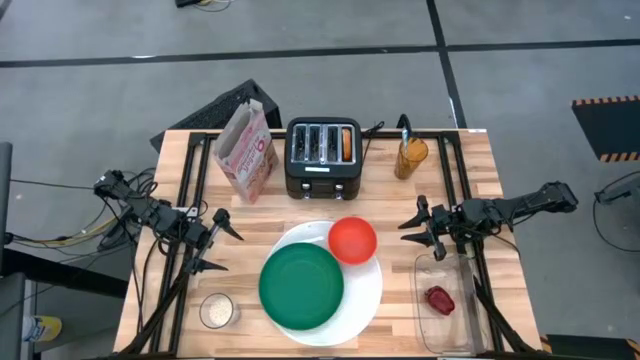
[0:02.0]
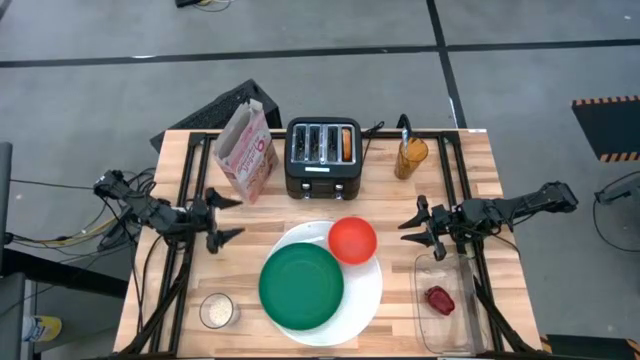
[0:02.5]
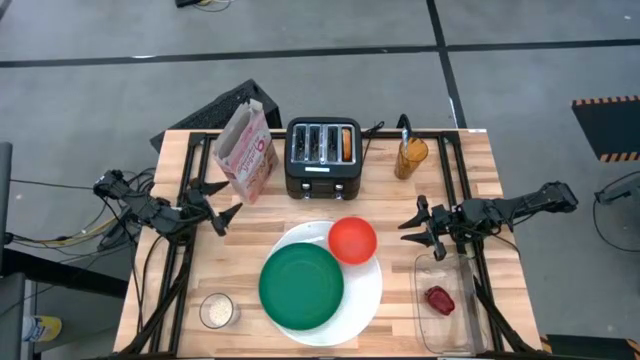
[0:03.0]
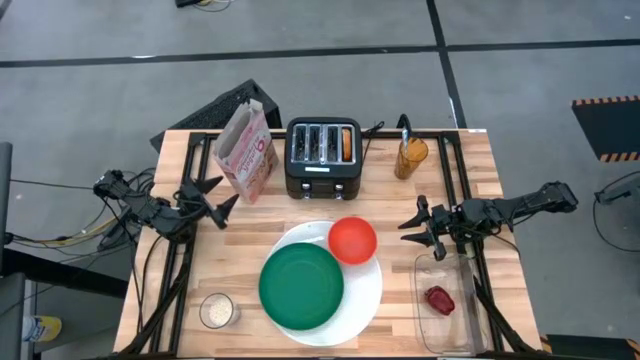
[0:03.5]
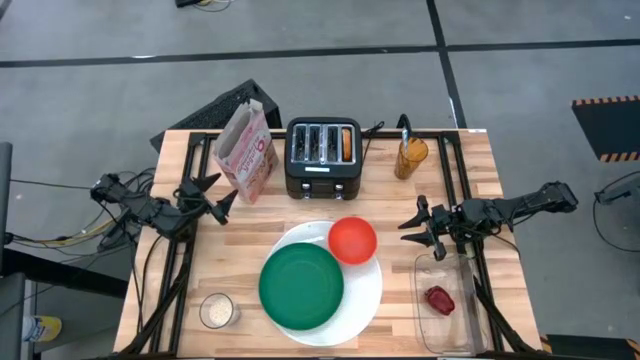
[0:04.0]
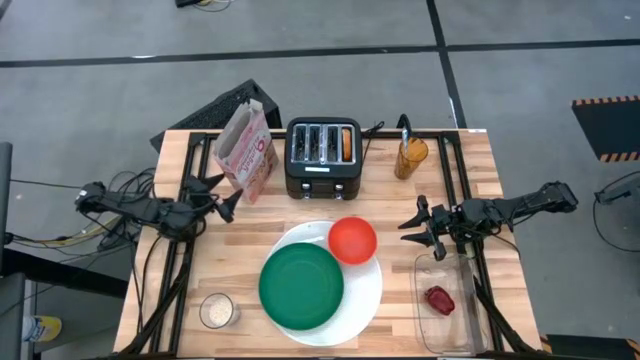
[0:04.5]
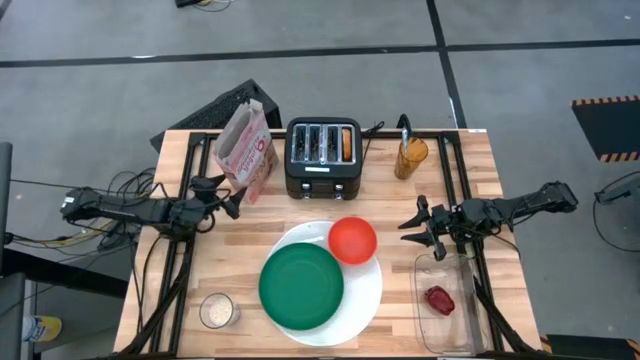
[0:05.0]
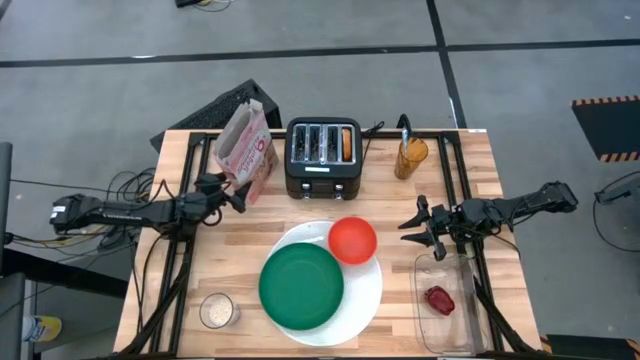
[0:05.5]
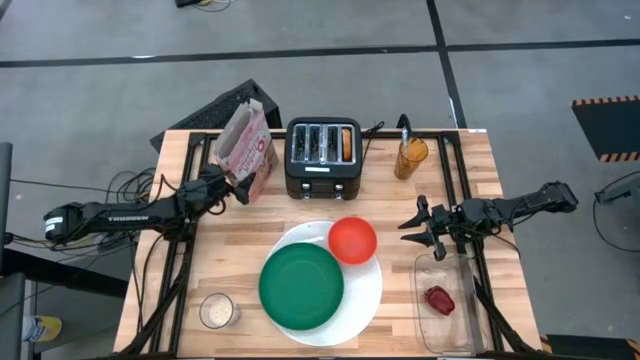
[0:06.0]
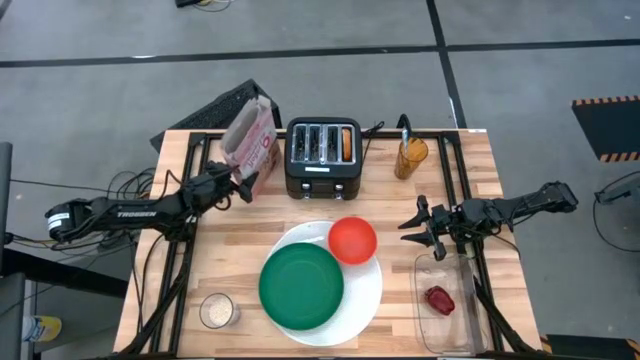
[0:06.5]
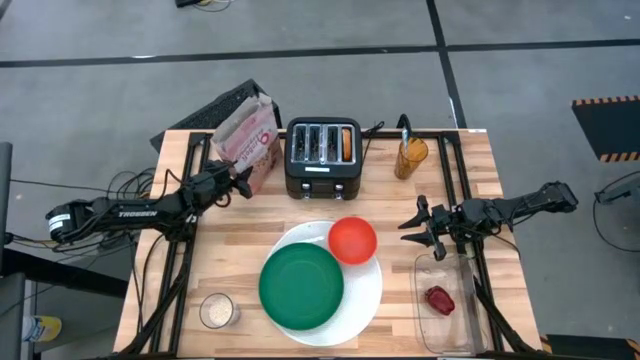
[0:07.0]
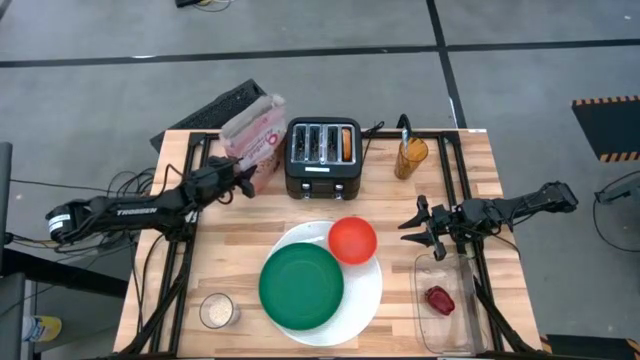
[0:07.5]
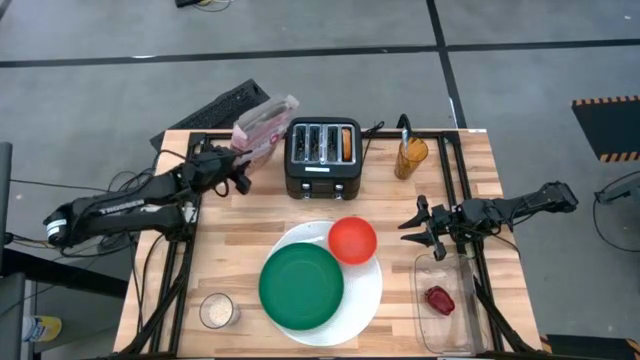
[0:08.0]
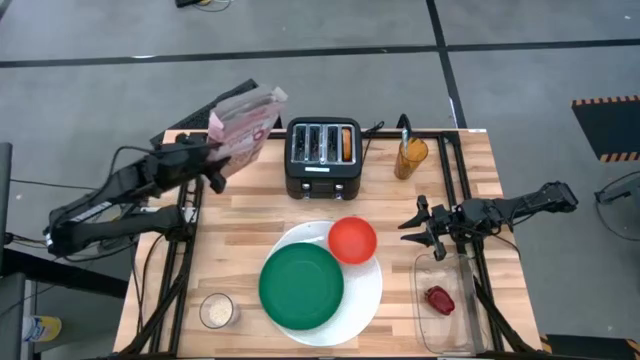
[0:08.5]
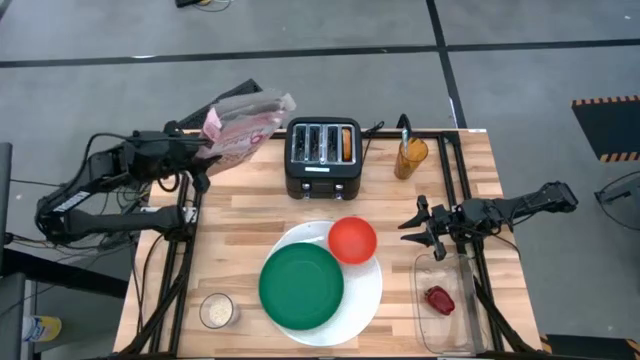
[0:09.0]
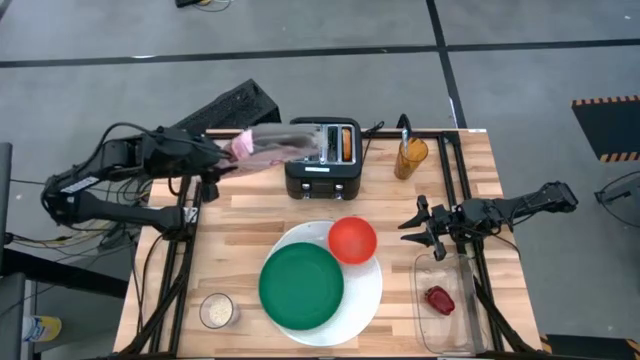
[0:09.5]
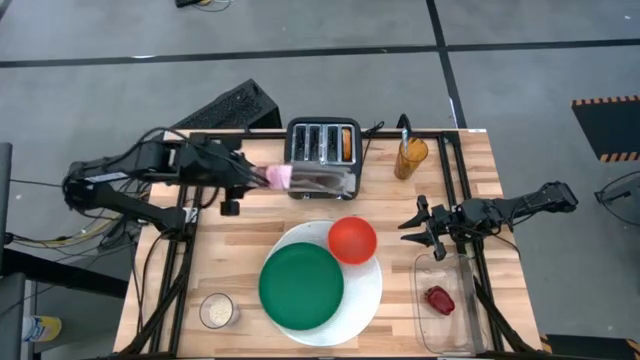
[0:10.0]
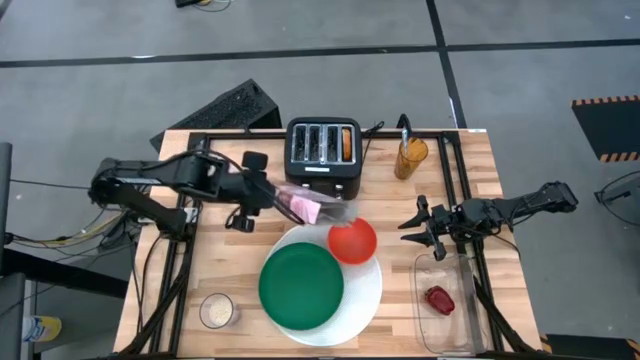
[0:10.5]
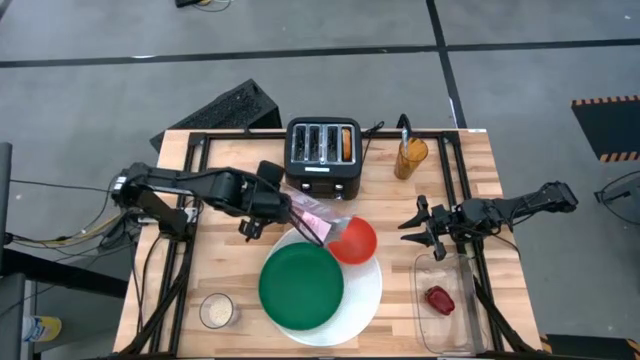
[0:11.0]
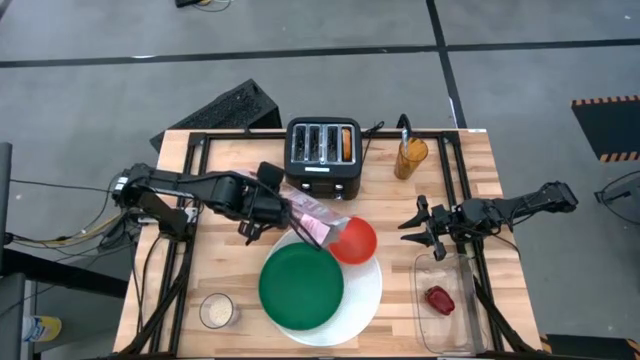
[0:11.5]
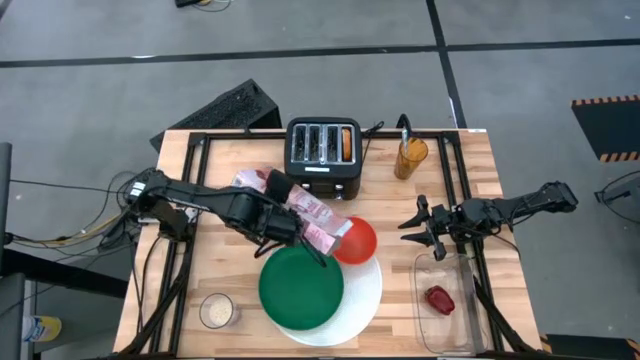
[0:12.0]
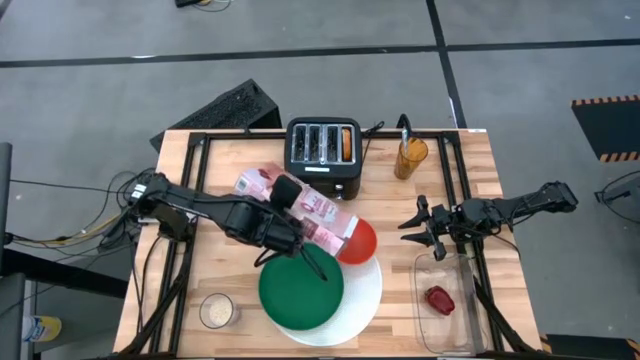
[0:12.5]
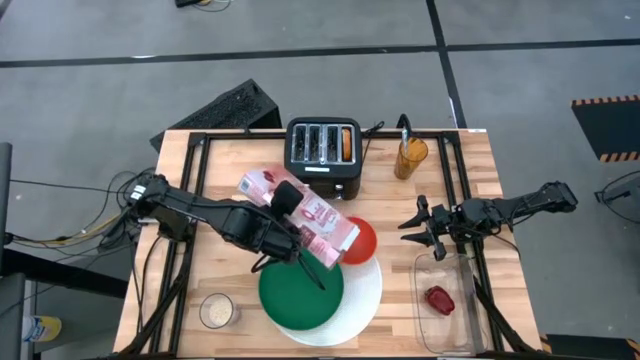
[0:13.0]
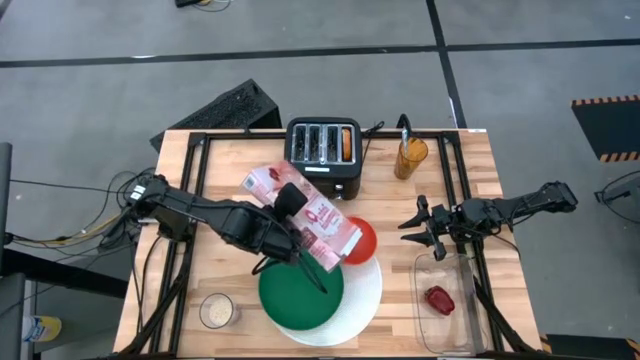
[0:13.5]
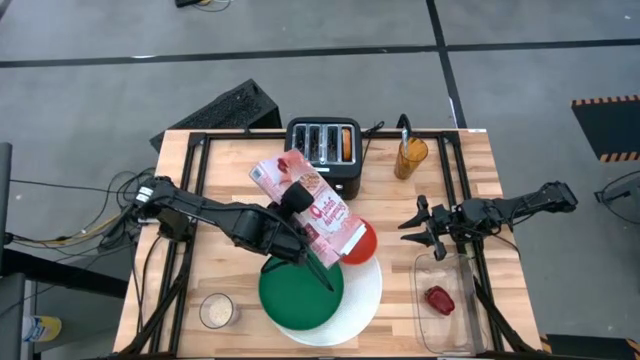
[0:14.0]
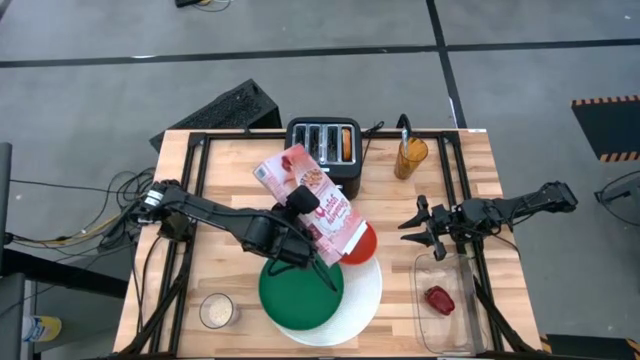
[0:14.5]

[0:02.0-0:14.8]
Task: Arrange a breakfast setting
Pour the cereal from the cereal box into the orange bowl

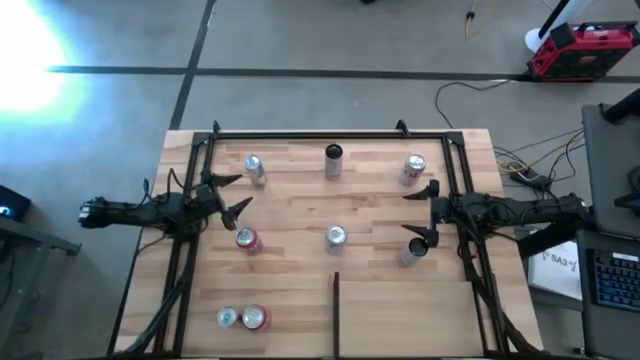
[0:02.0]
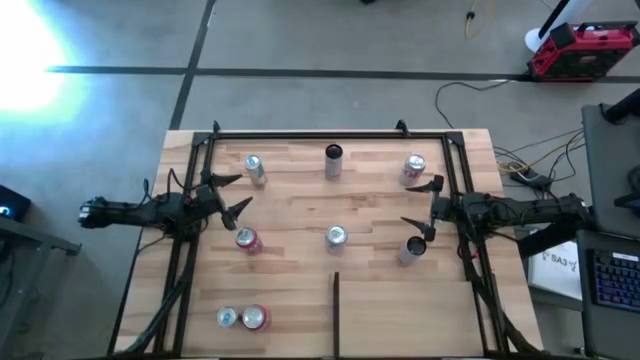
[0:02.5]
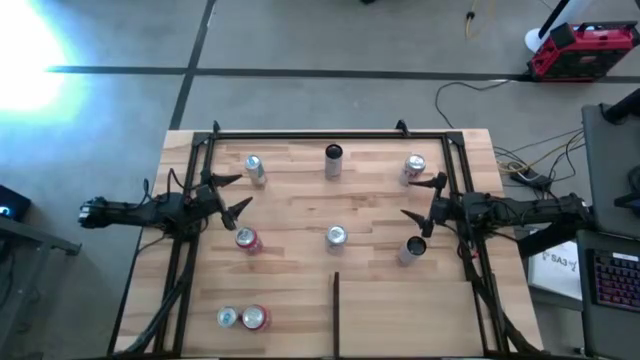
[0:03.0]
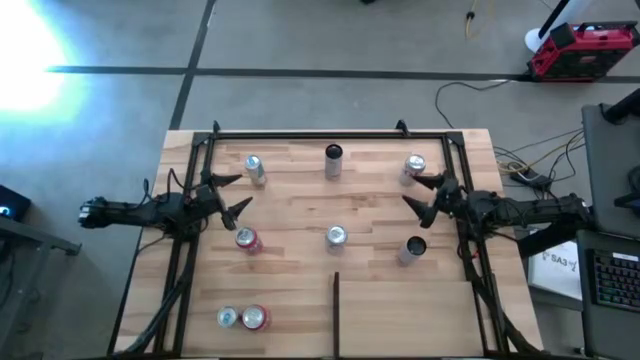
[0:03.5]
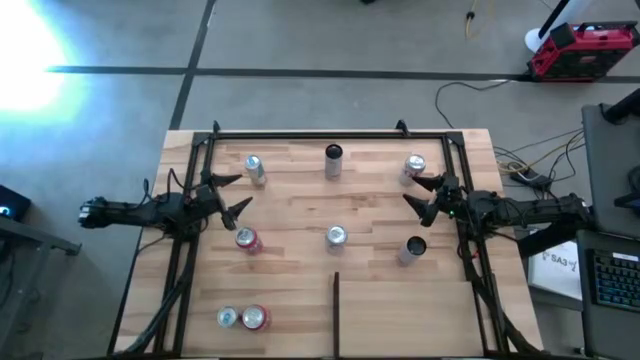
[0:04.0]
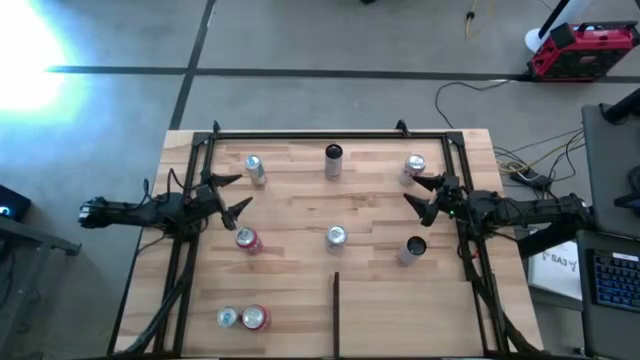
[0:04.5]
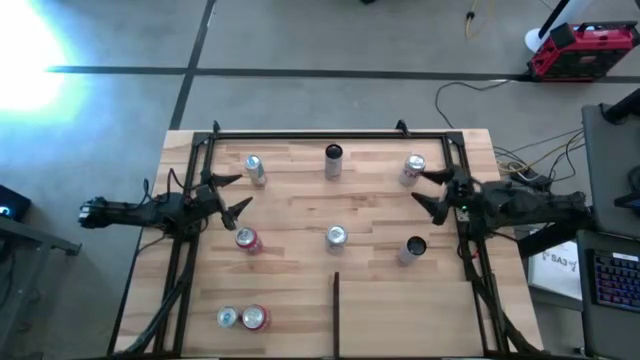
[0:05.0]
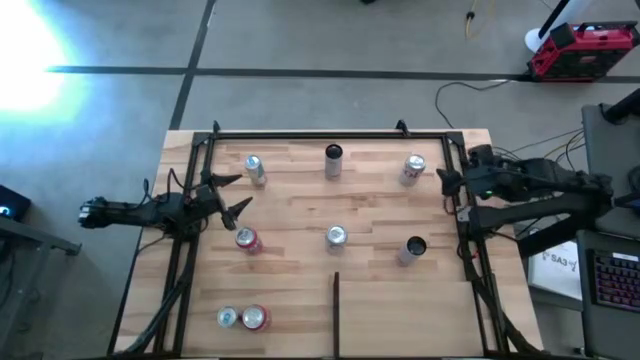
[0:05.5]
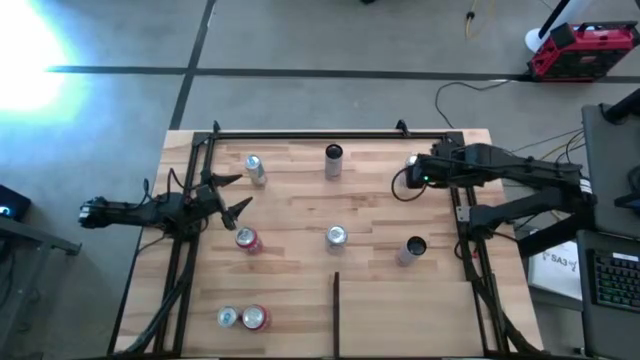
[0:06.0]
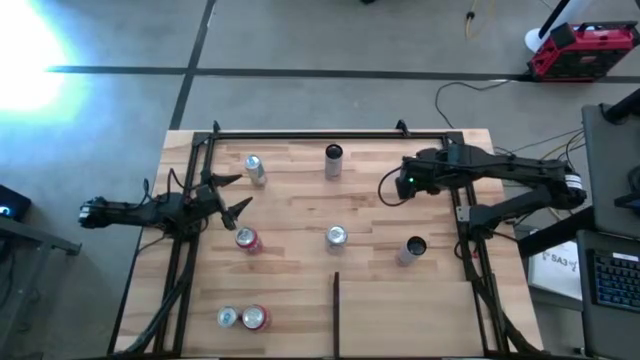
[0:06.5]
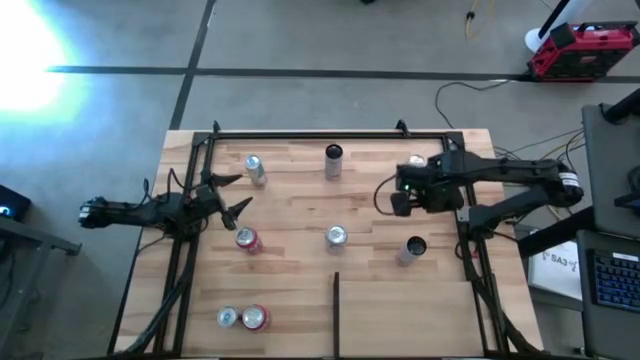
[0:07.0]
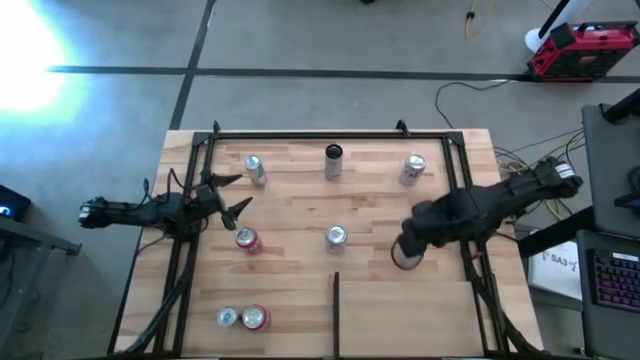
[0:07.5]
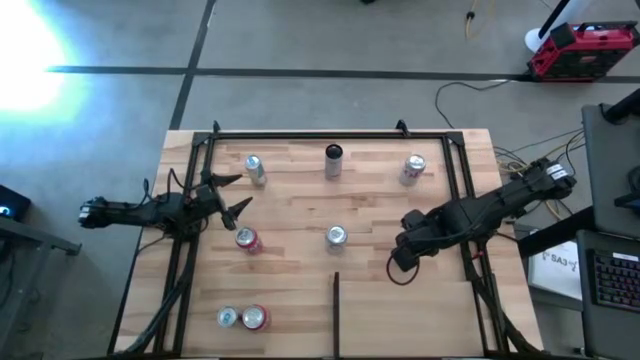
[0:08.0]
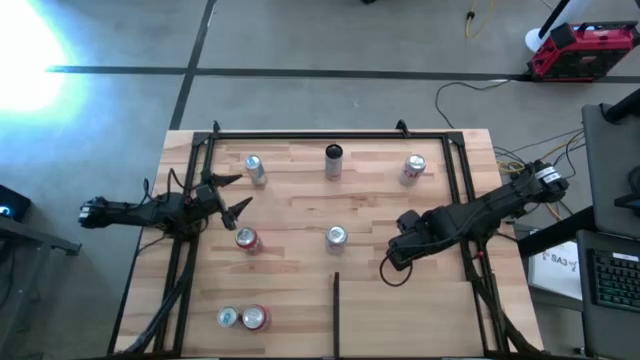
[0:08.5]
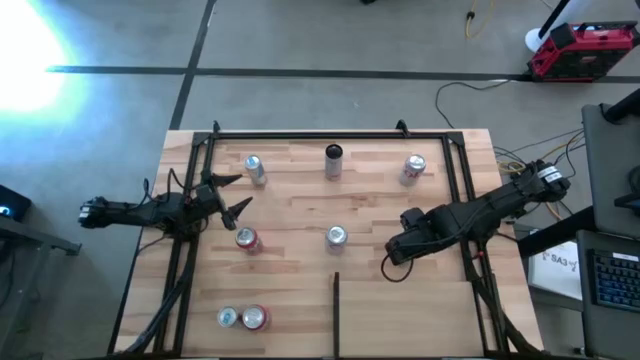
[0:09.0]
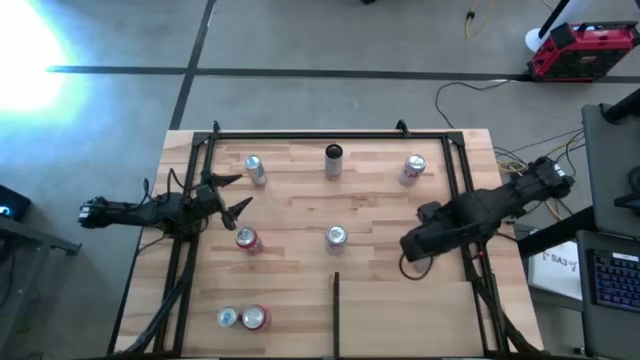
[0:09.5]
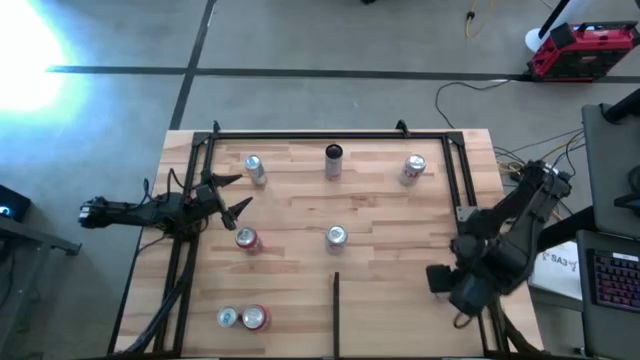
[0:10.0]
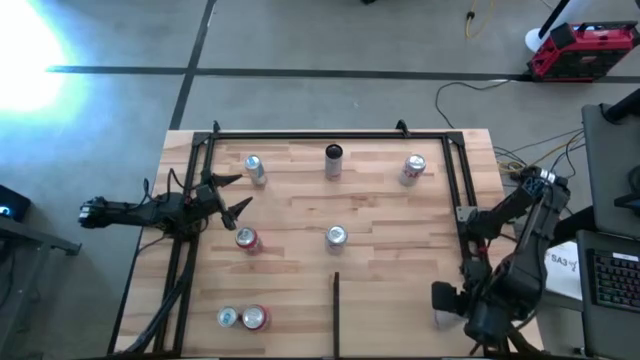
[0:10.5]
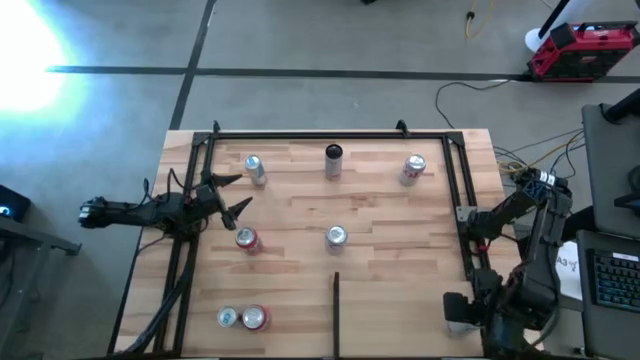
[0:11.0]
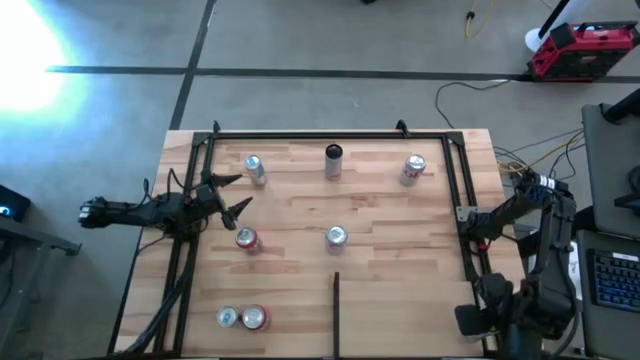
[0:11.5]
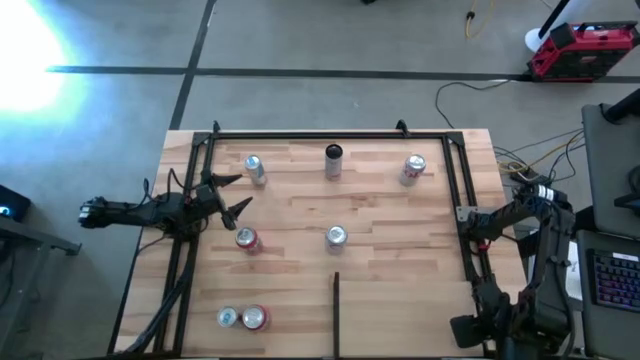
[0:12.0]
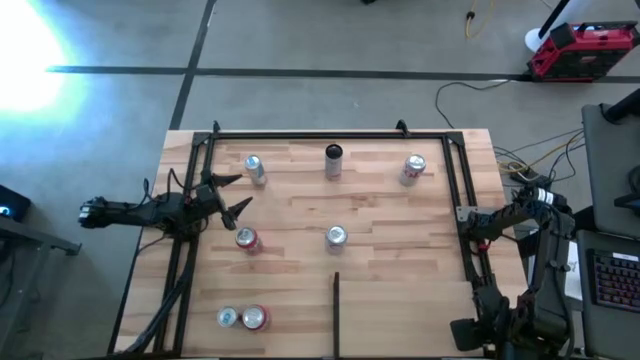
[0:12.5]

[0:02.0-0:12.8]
Task: Place canned beverage on shelf
Put the bottom right white soda can on the shelf
